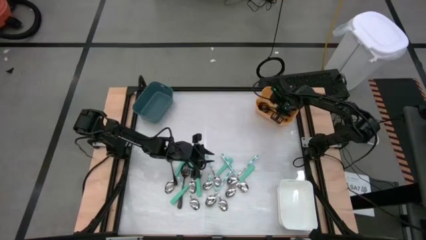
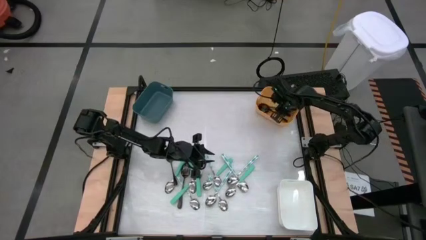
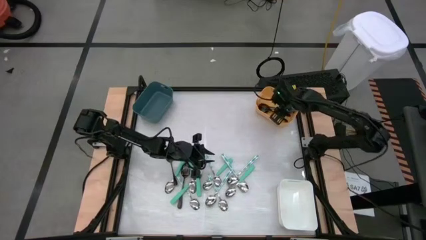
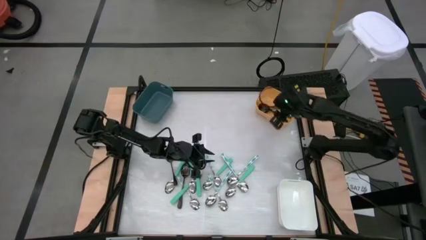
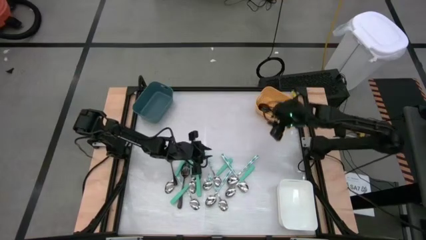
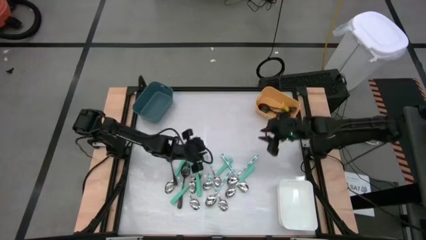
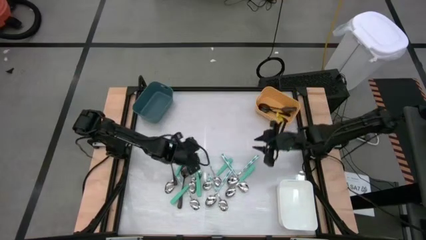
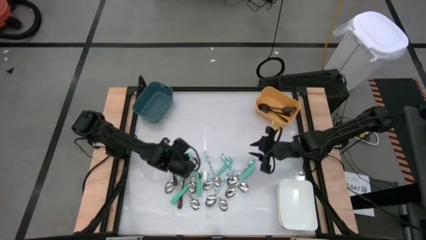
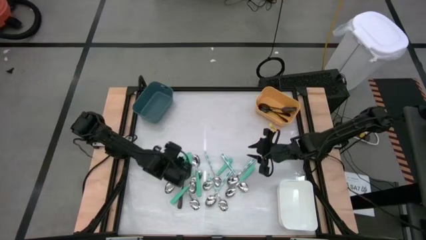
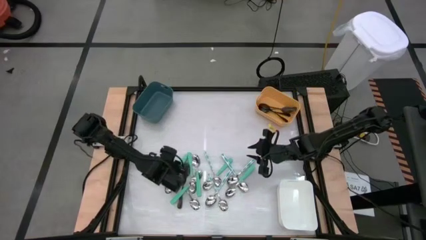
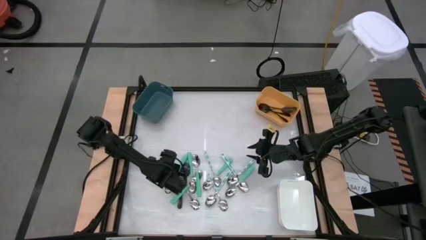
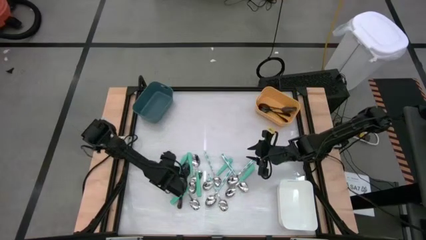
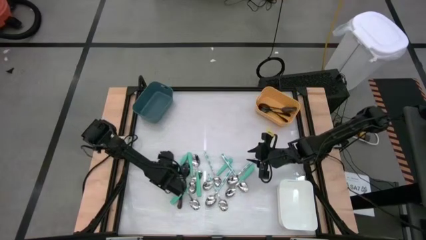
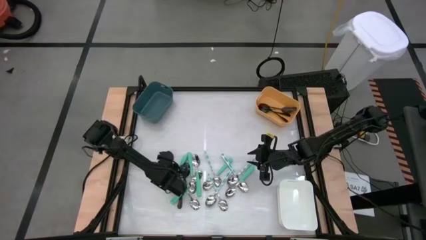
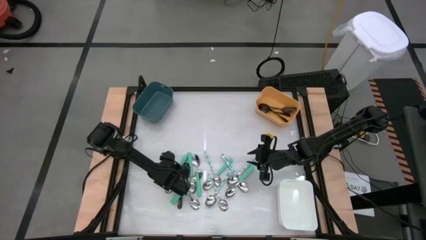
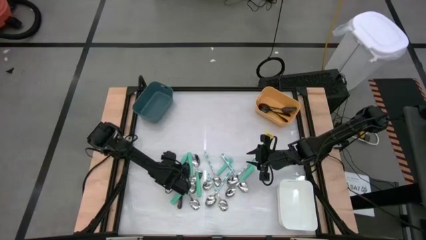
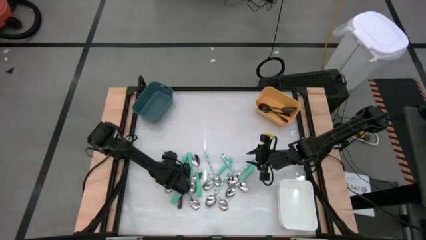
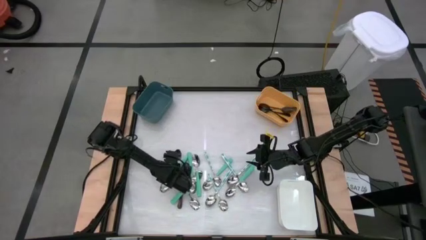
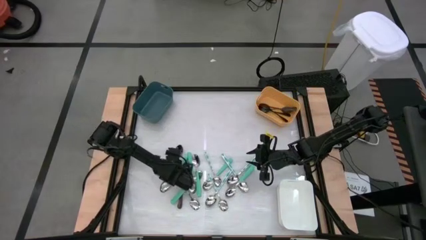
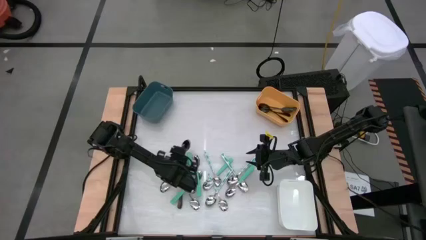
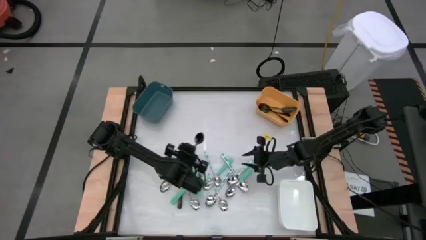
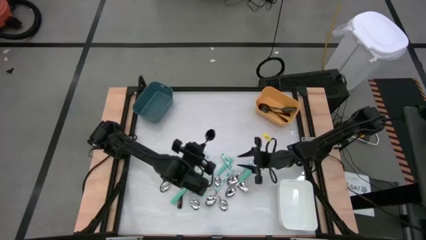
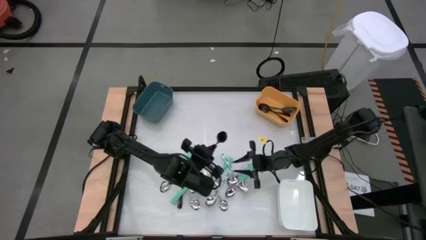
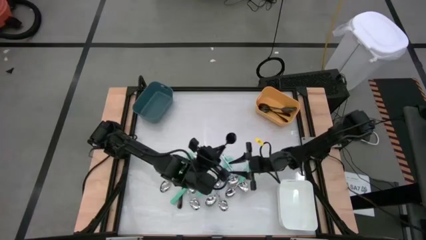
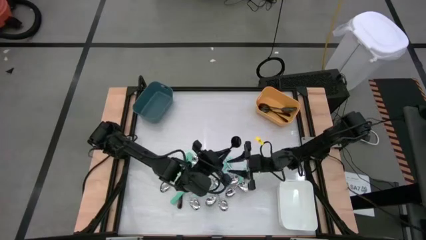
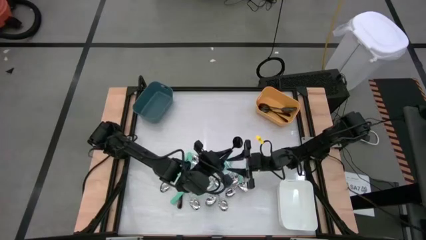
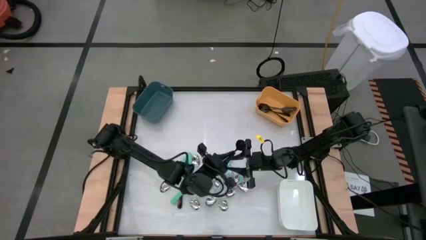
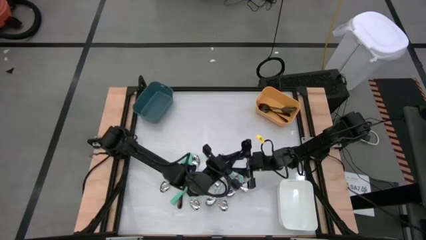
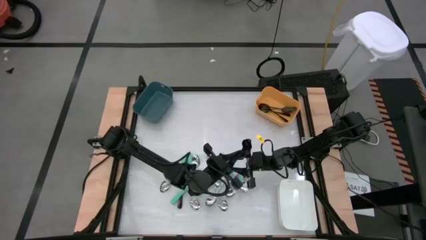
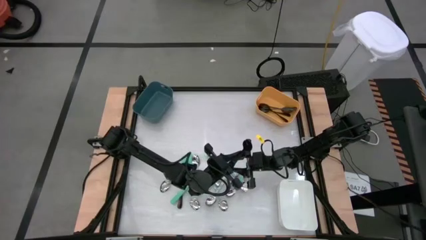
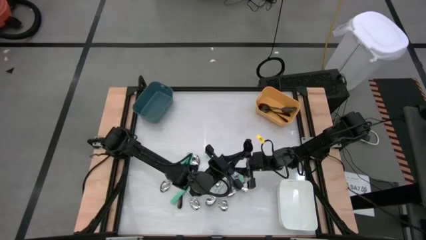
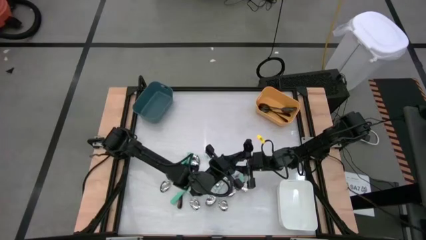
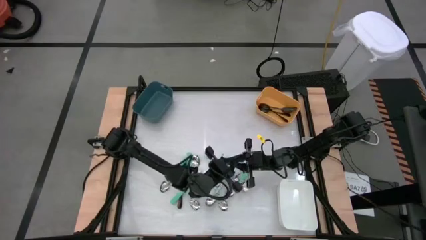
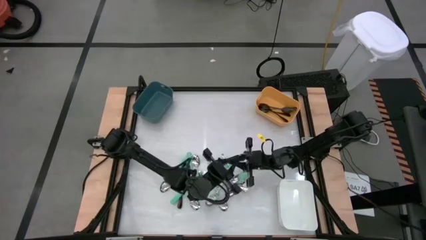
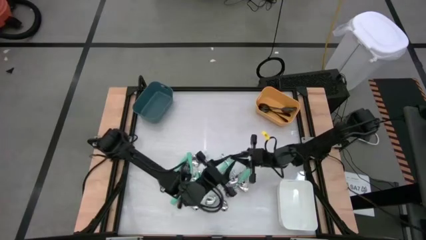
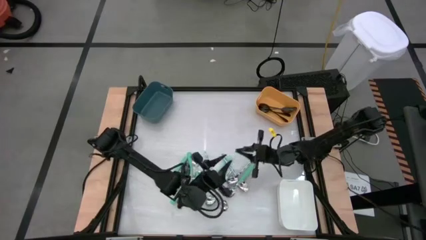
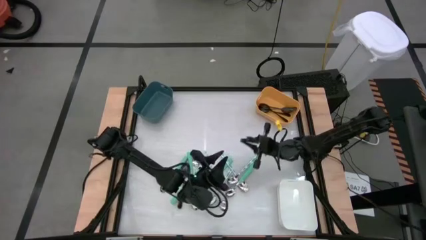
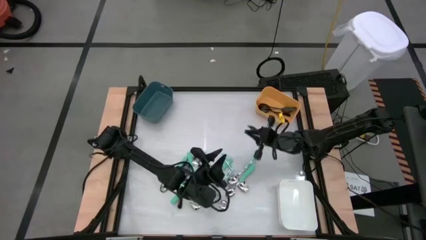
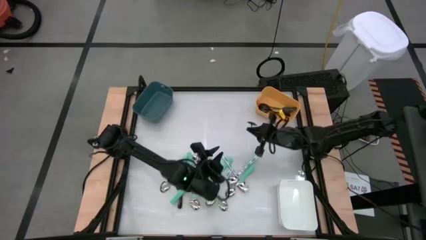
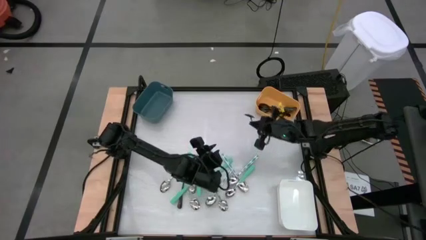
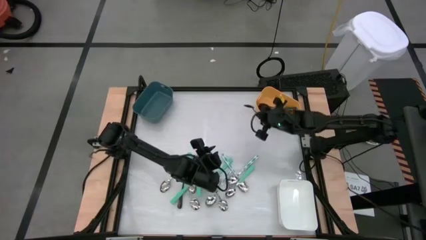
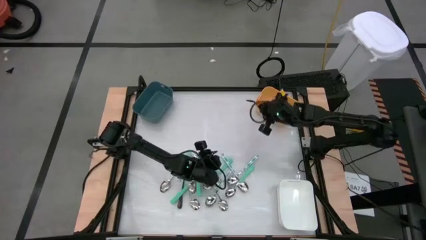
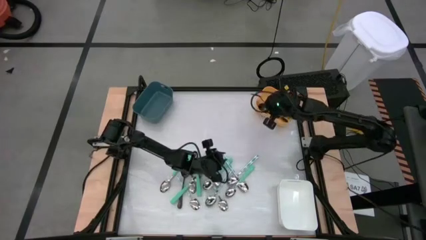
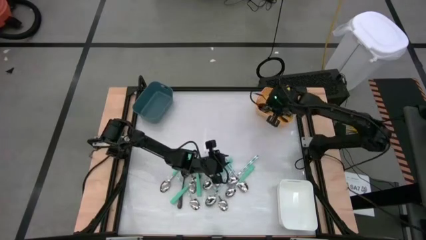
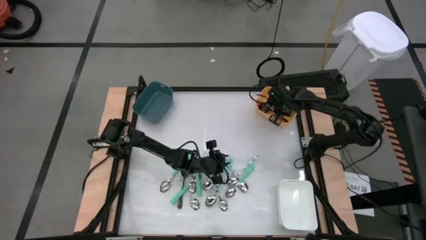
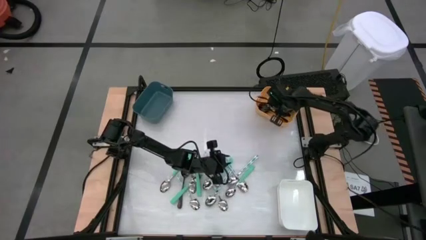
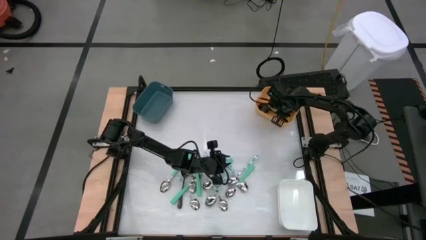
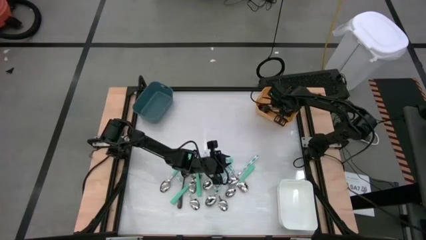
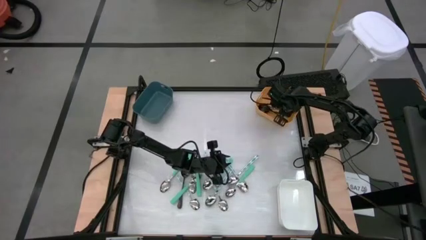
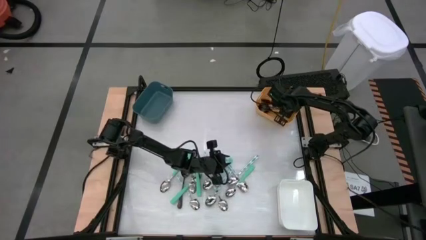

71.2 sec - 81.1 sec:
Task: Sort silverware by color (type)
Put the black spoon into the yellow bin

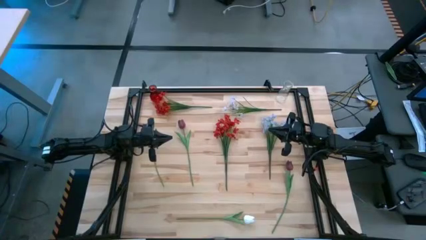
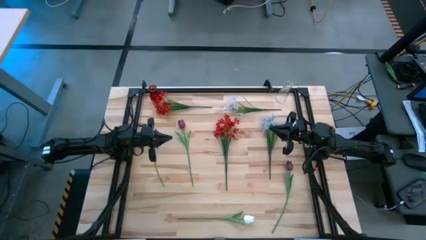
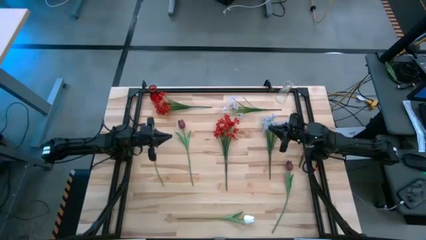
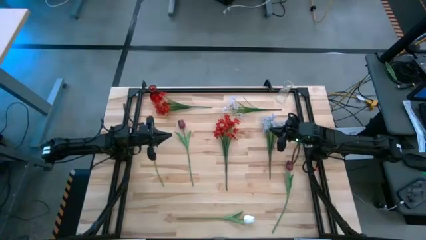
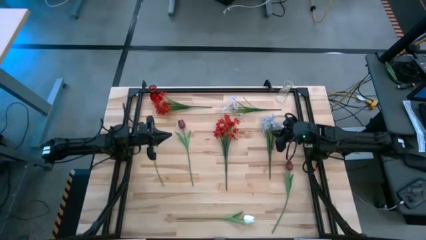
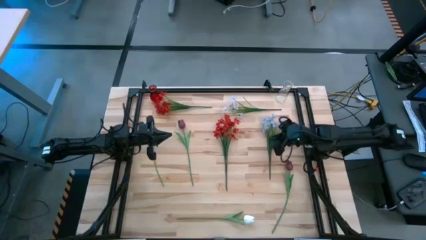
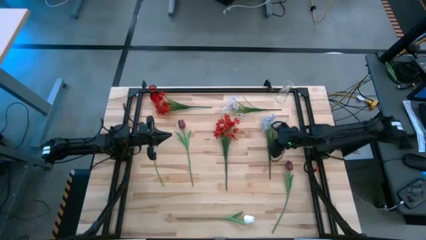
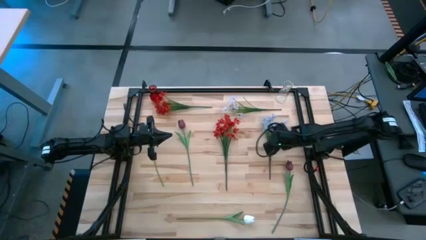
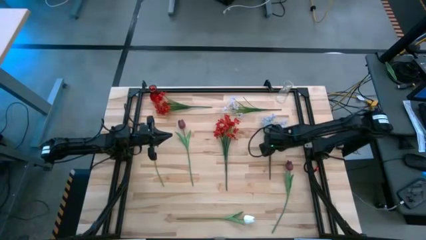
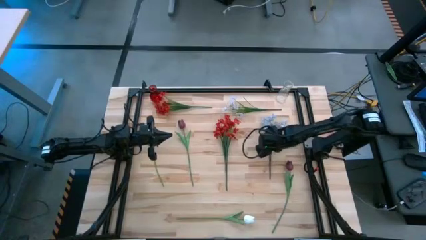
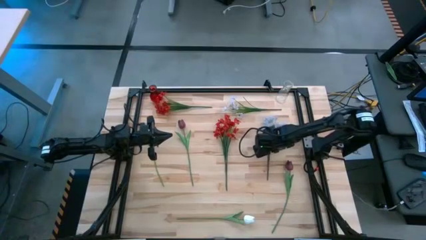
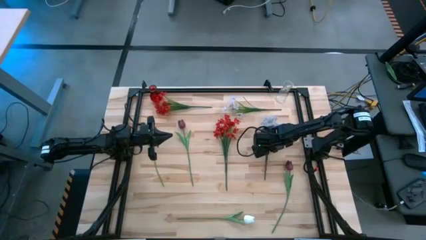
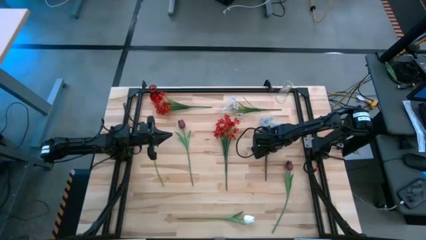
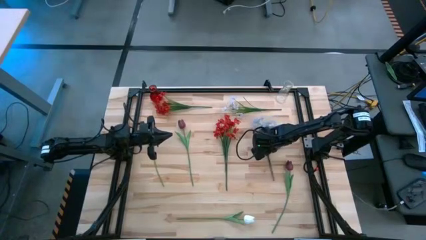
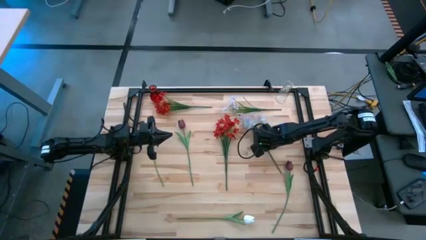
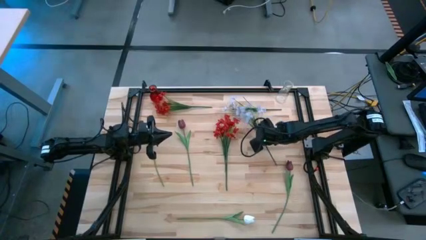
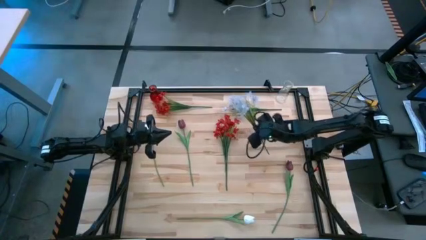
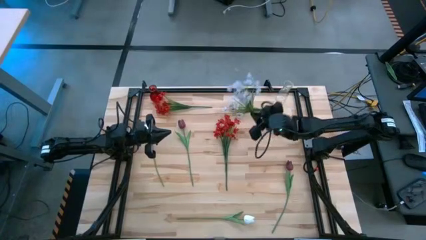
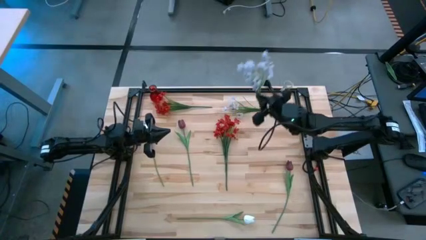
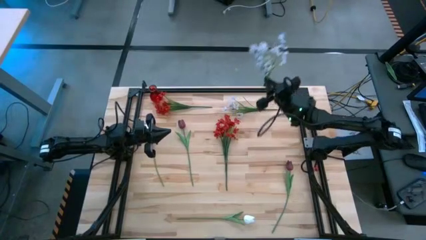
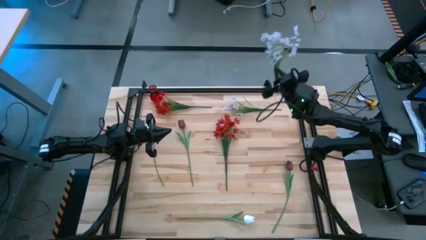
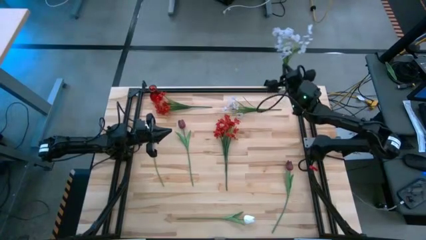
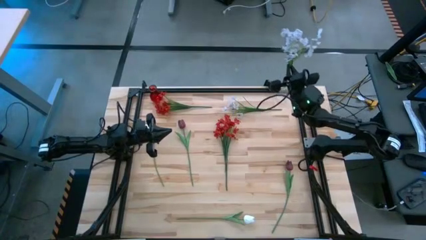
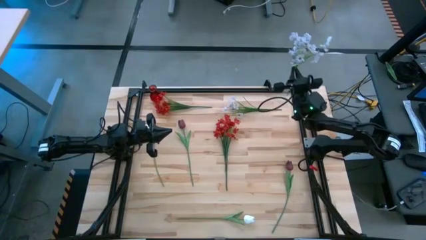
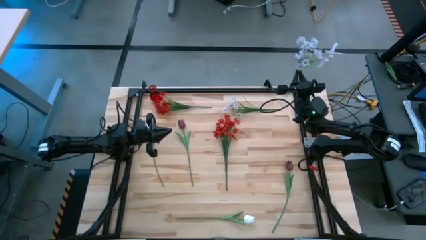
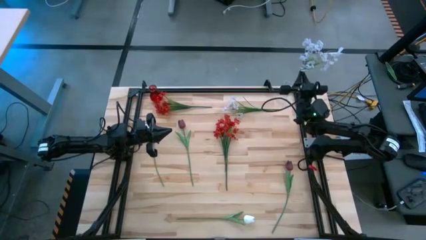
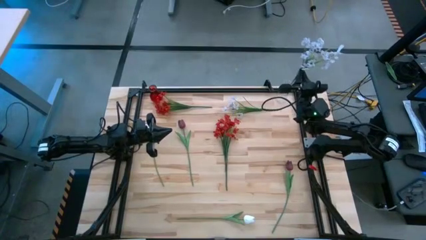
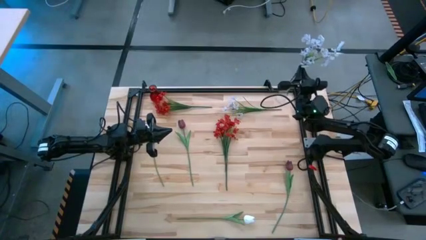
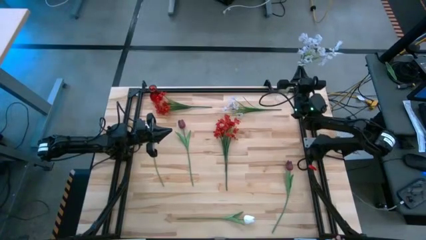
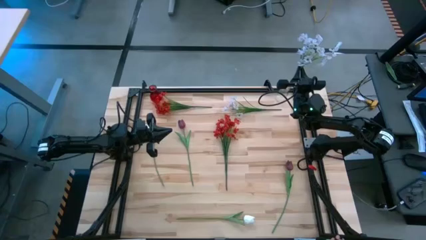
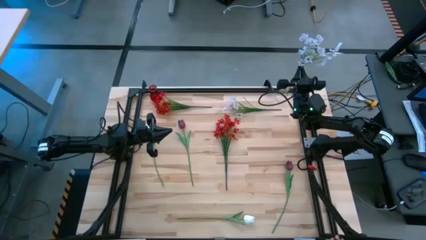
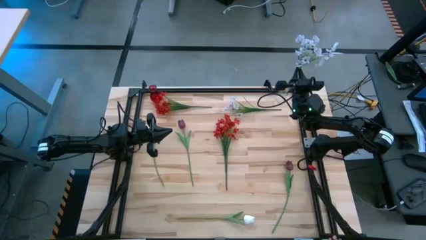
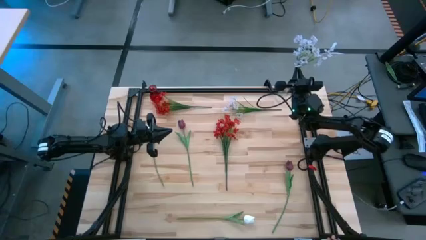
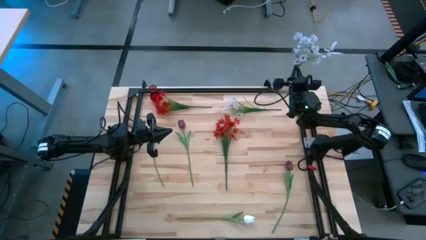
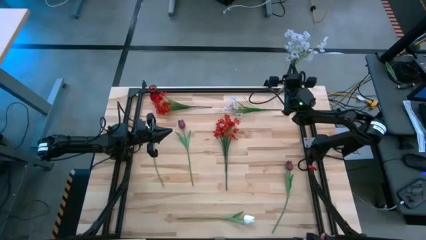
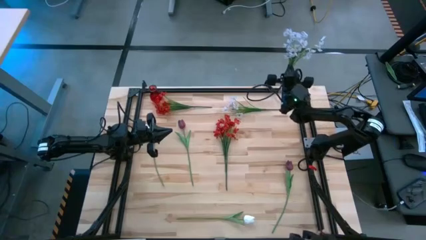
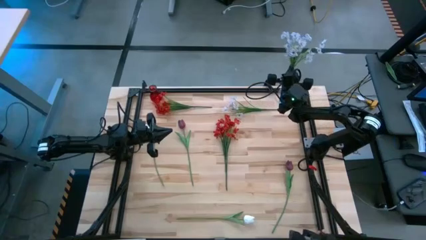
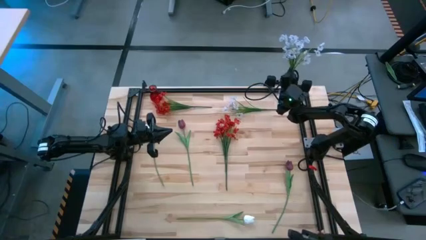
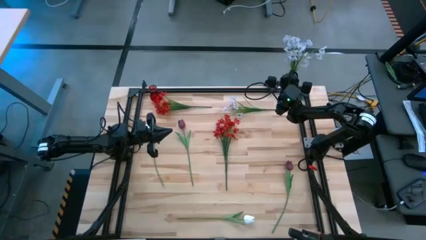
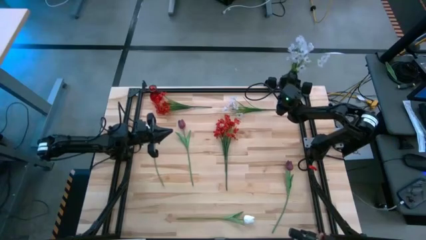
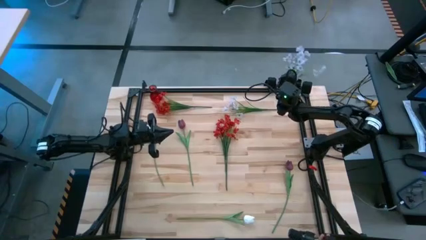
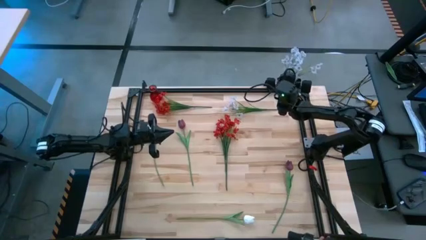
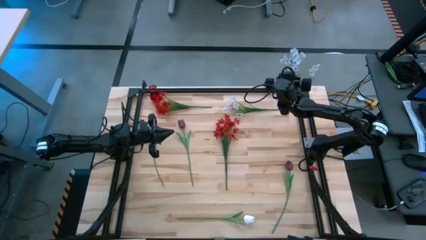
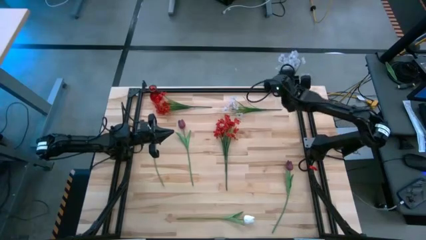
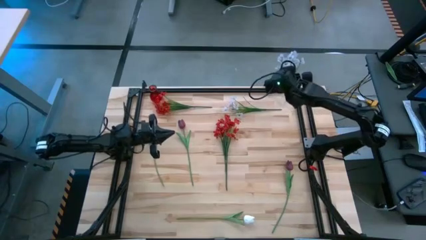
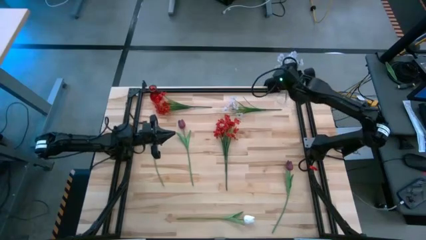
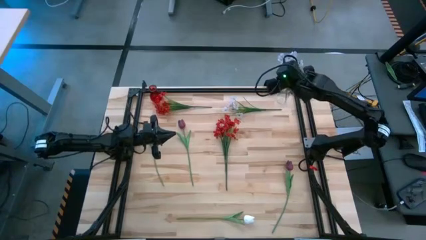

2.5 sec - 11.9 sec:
Task: Sort flowers into vase by color
Put the bottom white flowers into the transparent flower vase
